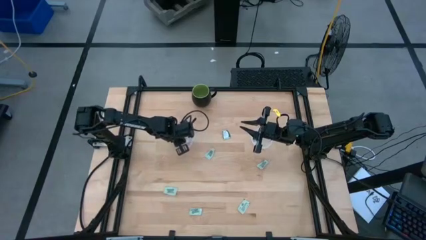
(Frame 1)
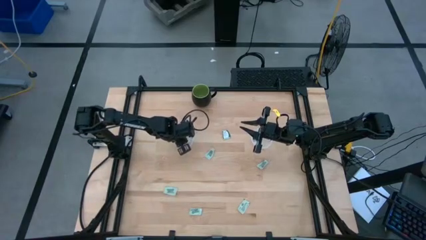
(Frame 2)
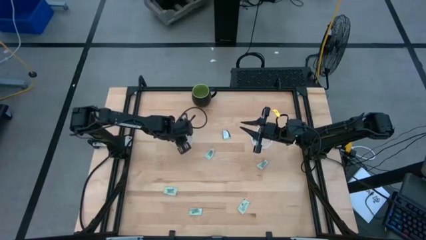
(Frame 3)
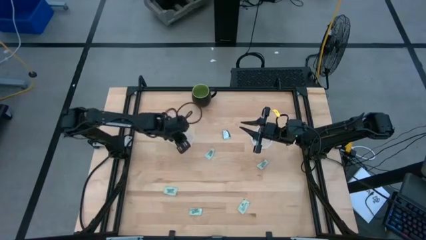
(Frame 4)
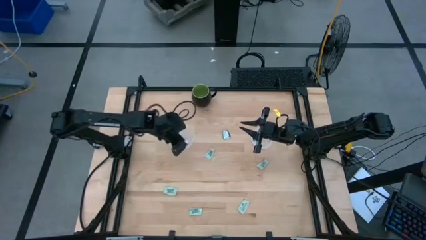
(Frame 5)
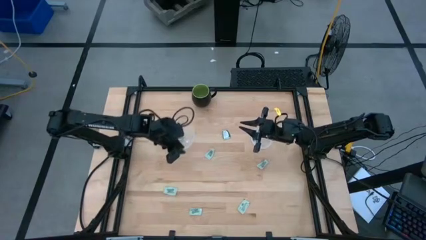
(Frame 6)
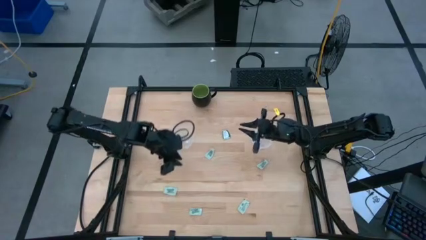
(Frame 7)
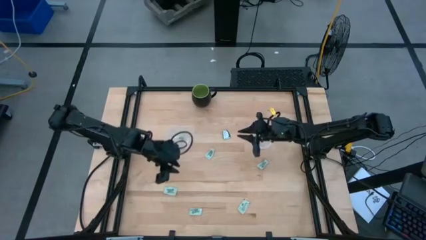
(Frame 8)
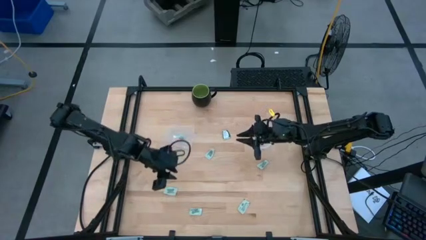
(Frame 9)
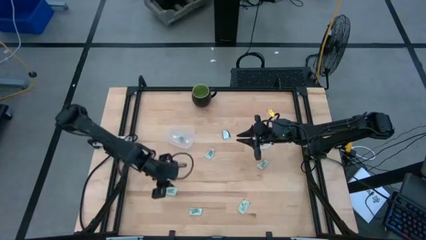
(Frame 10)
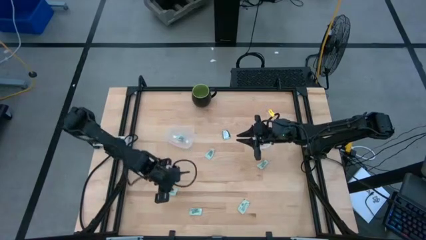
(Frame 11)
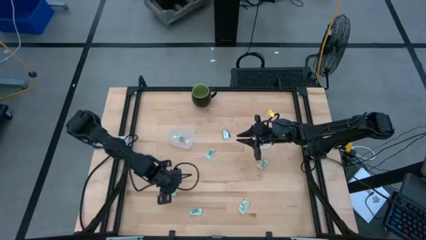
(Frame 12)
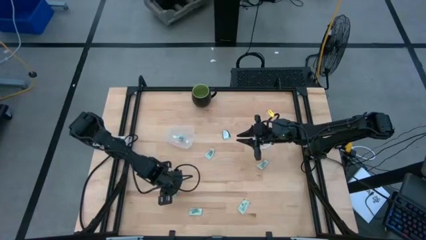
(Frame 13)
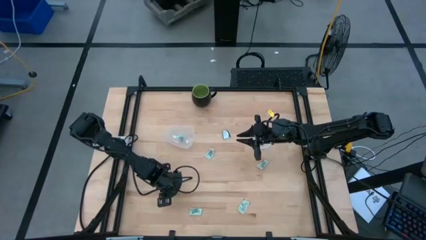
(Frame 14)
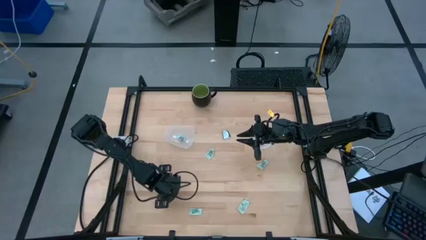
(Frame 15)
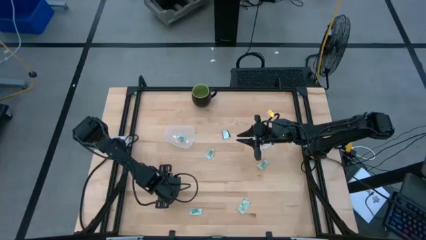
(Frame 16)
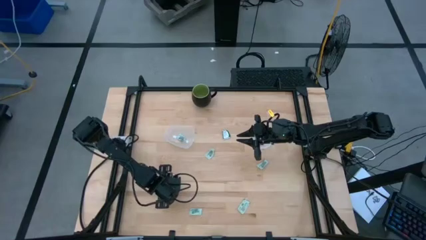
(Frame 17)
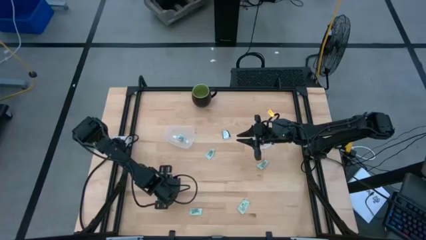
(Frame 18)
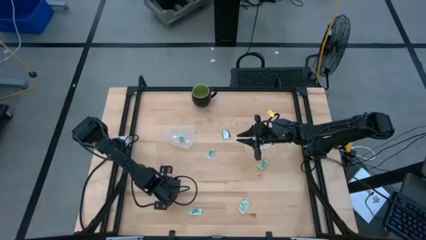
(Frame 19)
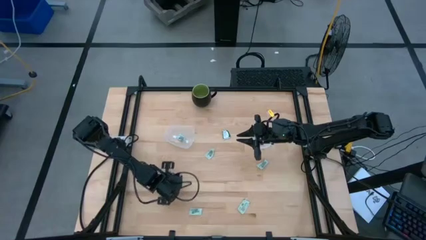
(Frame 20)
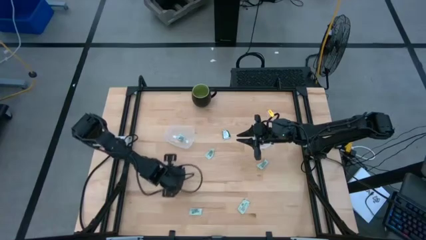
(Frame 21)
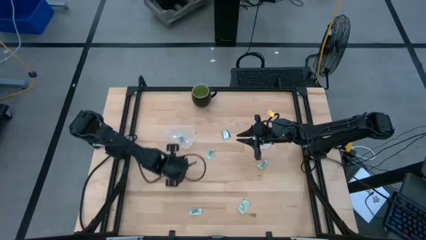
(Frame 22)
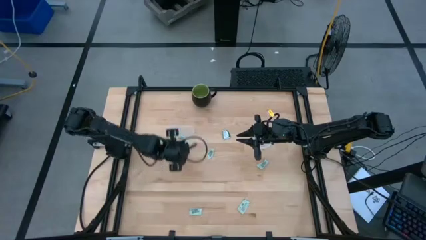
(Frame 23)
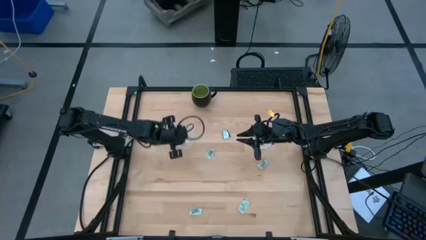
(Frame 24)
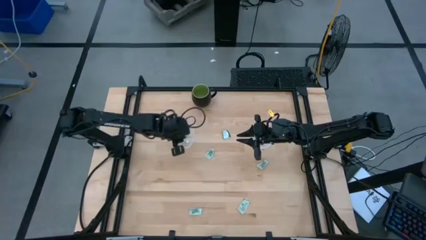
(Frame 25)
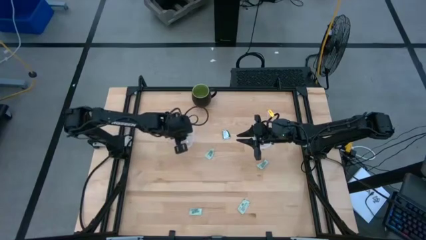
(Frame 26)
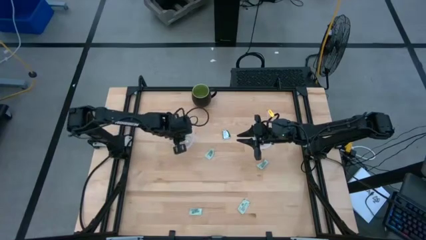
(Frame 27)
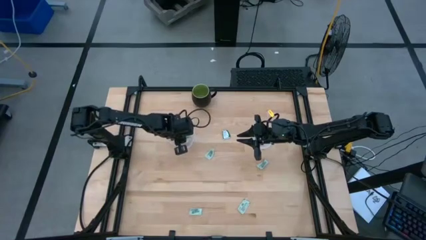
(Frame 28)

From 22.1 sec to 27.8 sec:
Task: Pick and place Stevia / Truvia into bins
Put the white stevia packet into the left transparent container

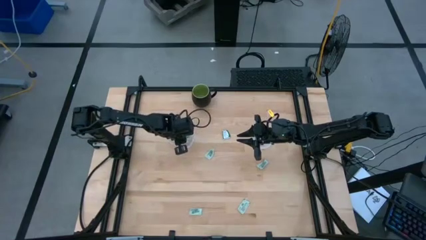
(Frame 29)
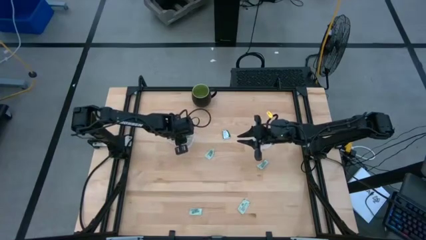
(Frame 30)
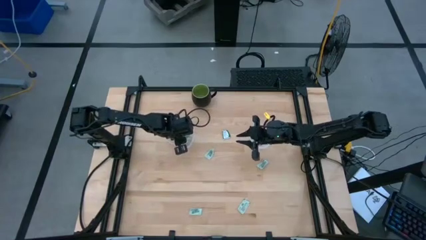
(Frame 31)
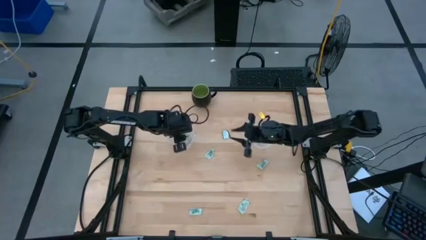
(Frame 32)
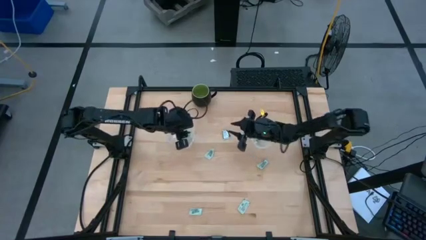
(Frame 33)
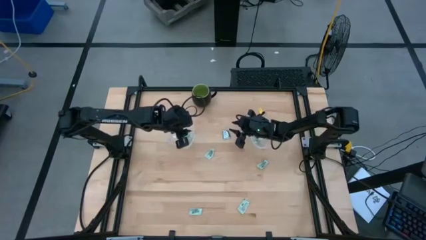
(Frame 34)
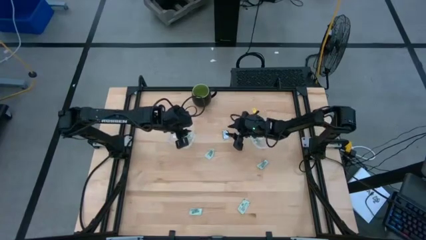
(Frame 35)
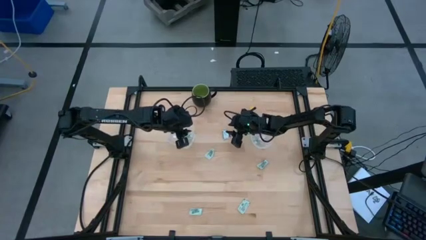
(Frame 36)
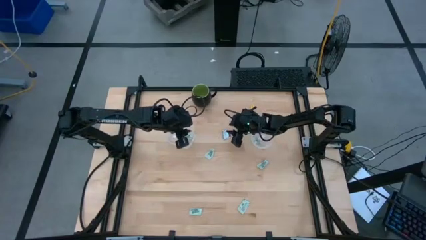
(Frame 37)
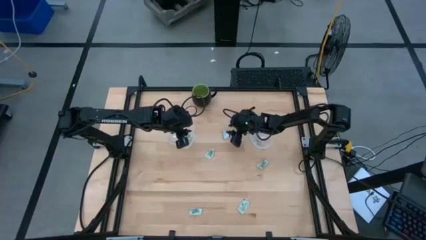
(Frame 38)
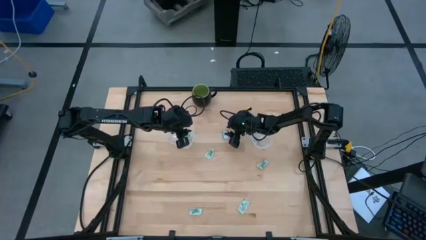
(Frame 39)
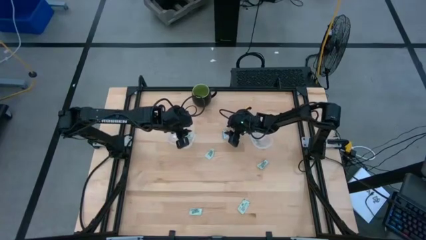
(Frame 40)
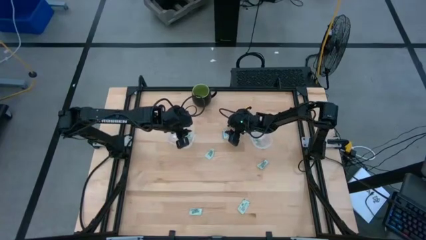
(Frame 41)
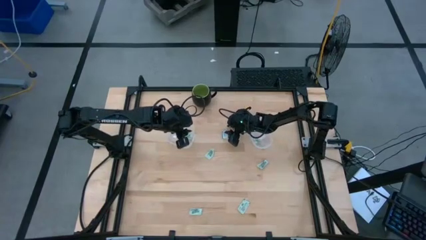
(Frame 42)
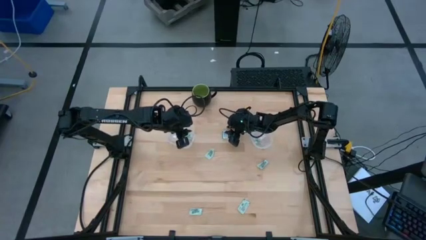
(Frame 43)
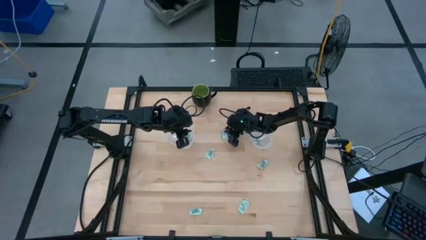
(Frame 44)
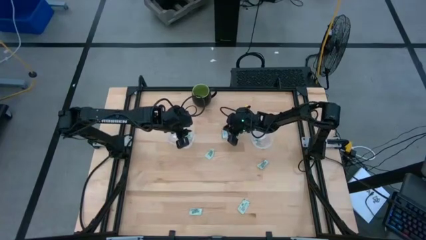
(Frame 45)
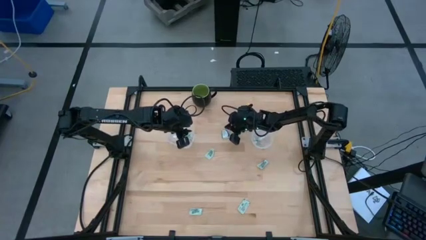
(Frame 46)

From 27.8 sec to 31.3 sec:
Put the green and white stevia packet into the right transparent container

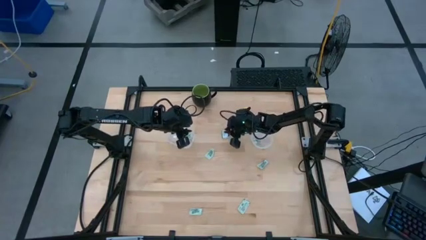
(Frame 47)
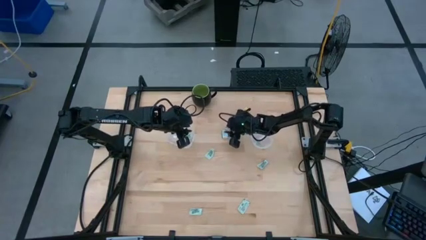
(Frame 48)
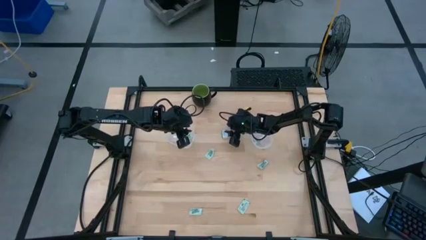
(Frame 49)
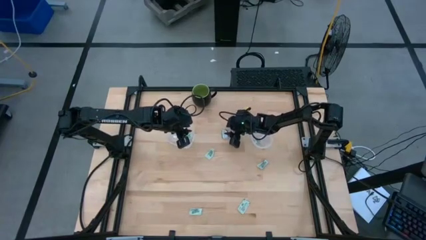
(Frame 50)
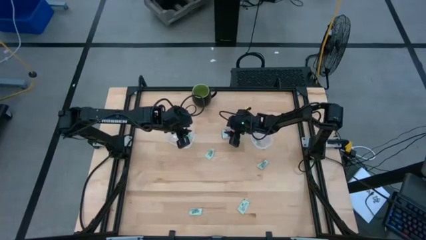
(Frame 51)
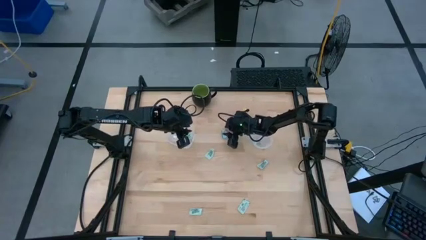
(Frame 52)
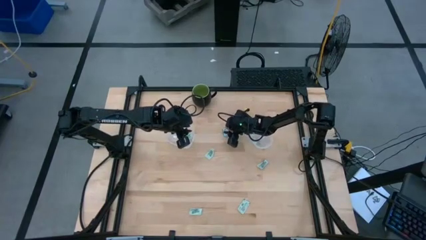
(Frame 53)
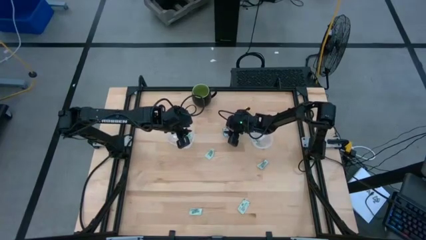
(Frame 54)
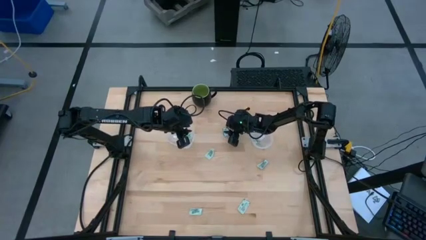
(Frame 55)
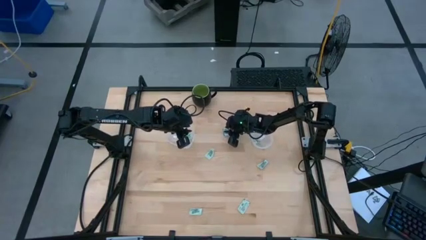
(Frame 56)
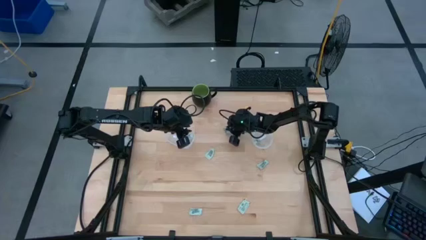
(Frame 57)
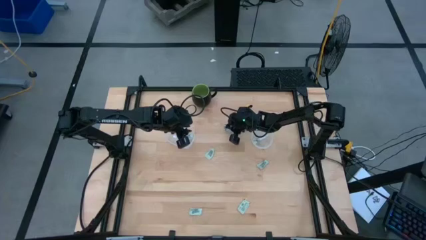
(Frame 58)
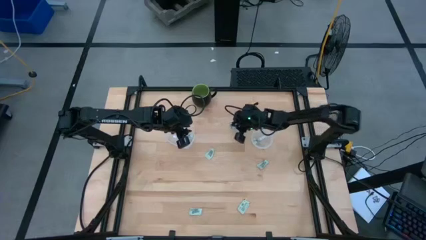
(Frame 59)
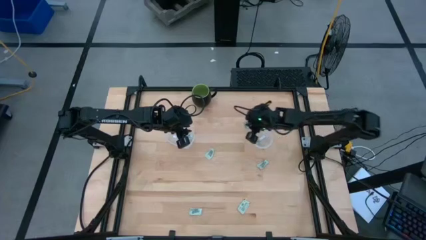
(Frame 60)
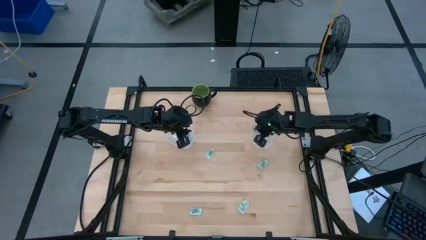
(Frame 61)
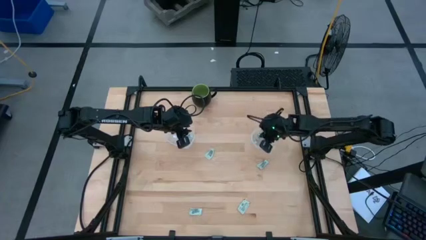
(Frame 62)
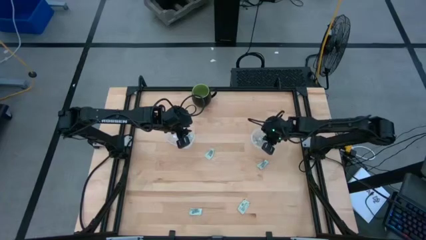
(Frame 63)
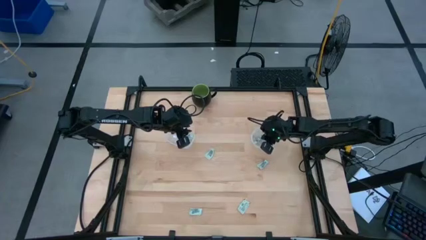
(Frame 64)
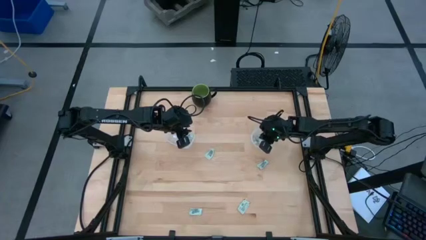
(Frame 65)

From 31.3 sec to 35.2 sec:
Put the green and white stevia packet into the right transparent container

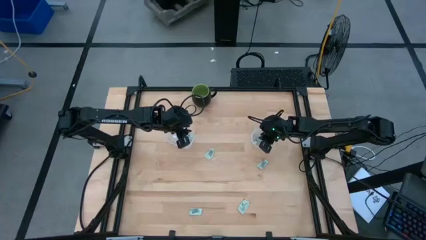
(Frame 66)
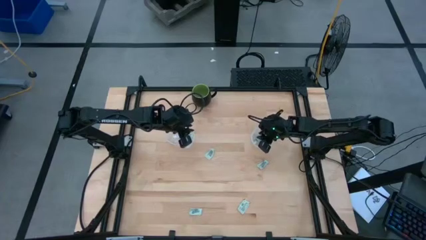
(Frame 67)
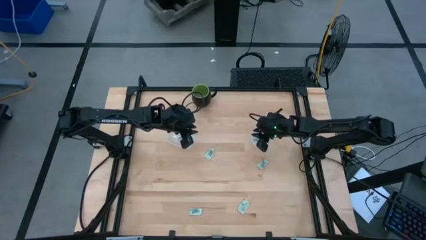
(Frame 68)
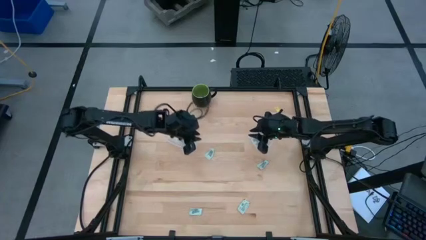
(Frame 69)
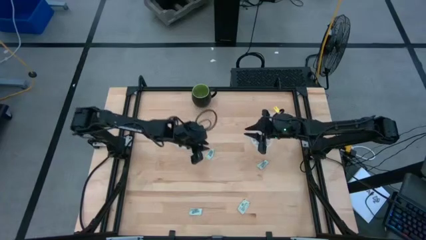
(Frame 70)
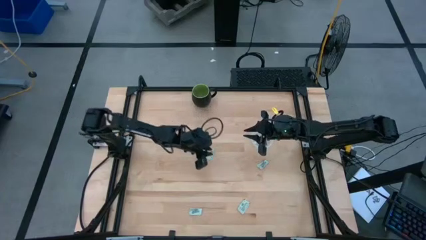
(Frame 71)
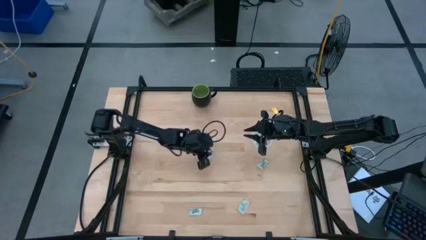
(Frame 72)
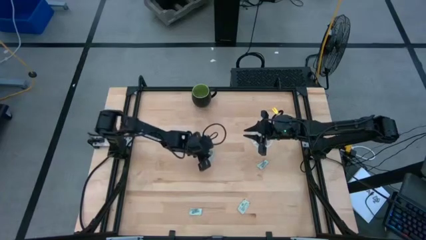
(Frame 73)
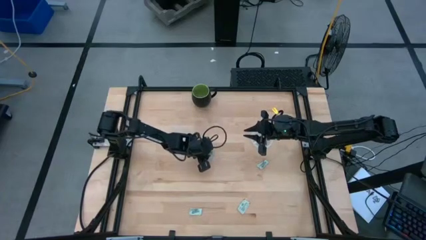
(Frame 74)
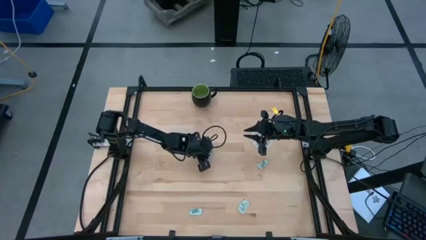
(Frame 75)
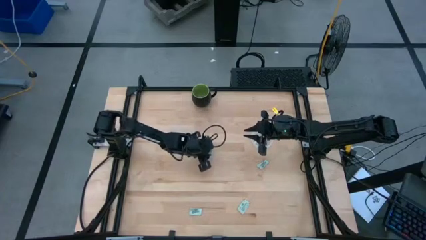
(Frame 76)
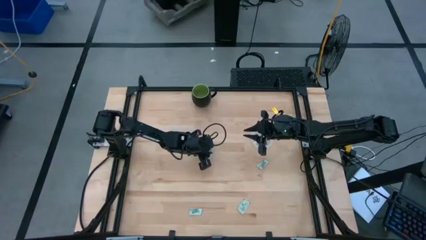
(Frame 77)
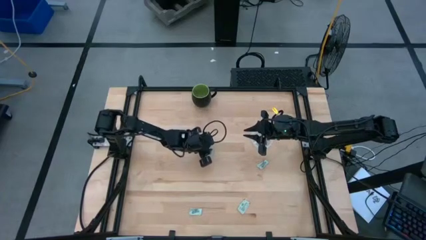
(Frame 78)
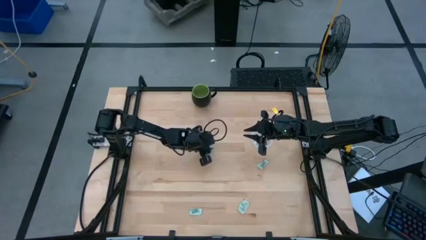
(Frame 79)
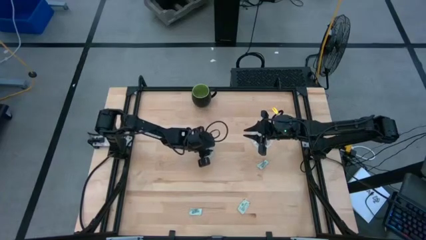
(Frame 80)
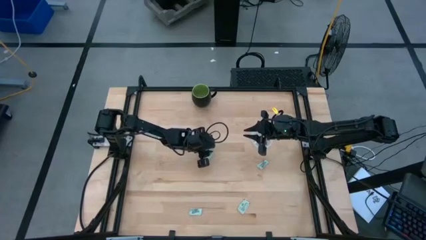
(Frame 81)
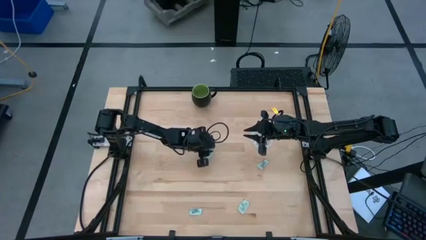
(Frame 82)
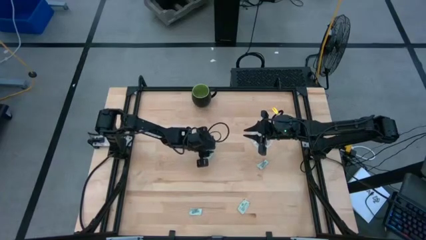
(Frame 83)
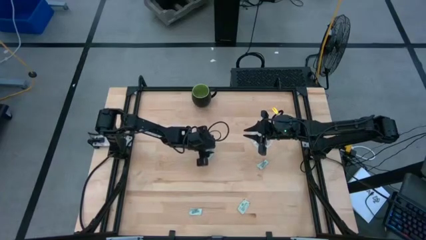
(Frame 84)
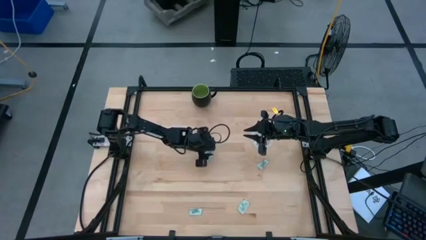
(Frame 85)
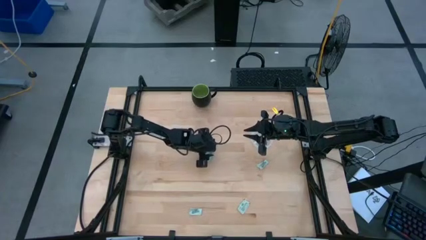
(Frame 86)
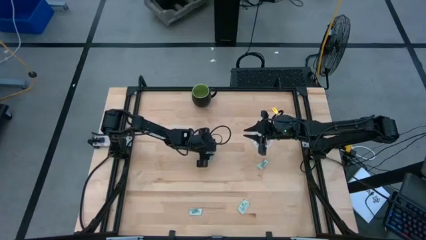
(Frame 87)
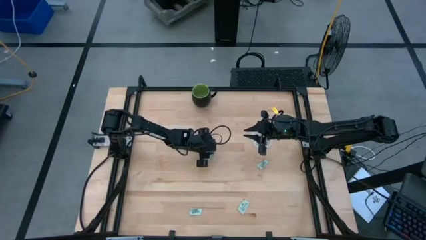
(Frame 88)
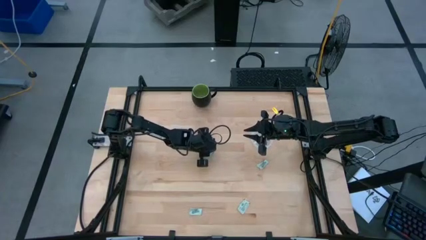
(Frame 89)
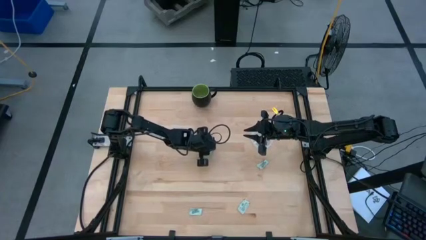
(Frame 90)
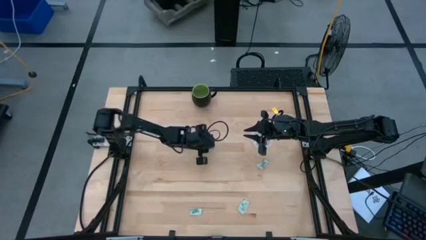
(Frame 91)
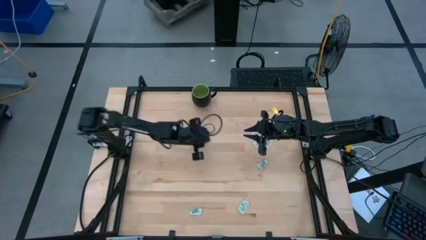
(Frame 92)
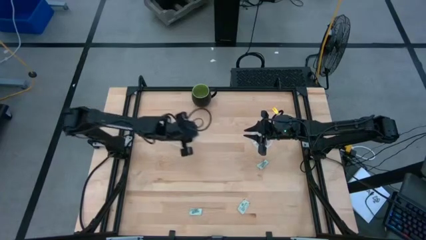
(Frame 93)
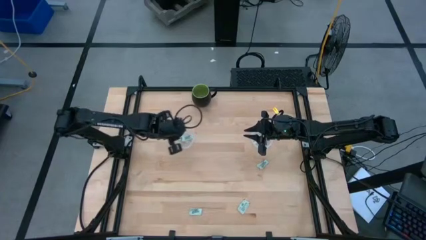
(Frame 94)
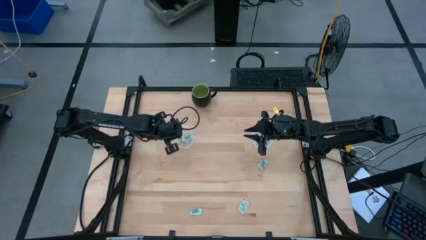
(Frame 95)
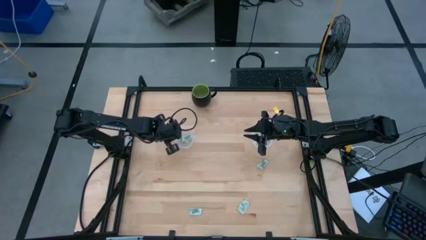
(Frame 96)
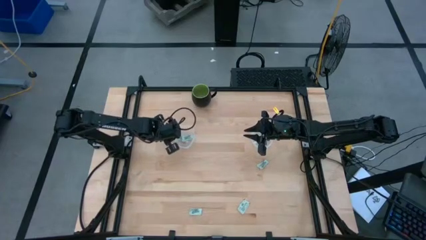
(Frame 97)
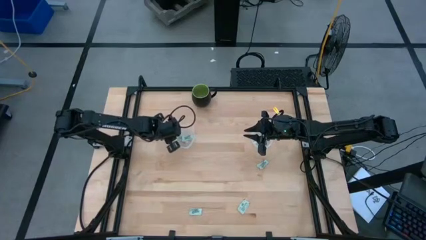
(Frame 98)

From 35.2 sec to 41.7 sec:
Put the white stevia packet into the left transparent container
